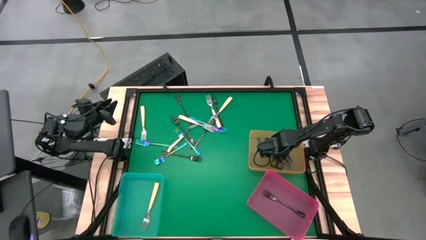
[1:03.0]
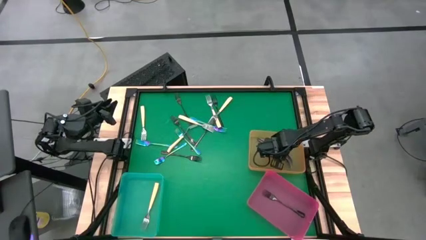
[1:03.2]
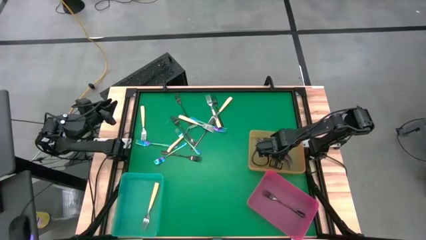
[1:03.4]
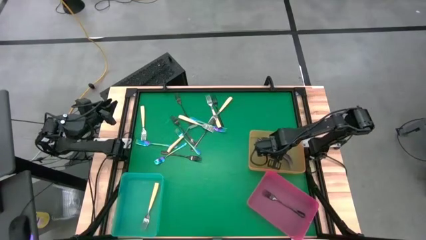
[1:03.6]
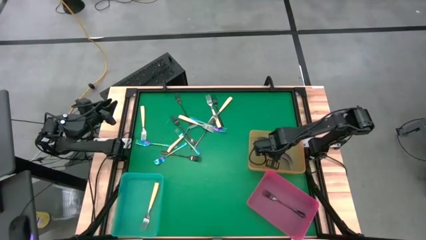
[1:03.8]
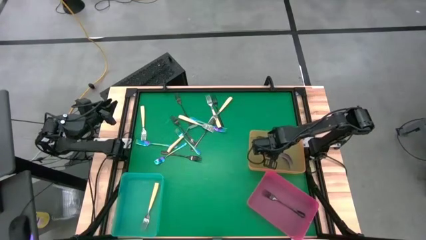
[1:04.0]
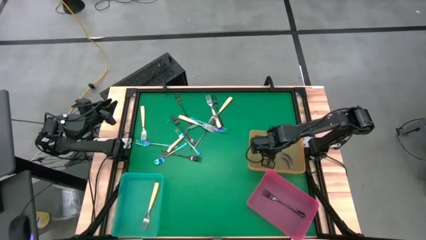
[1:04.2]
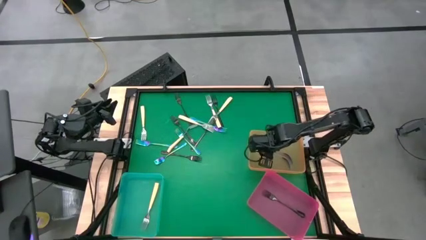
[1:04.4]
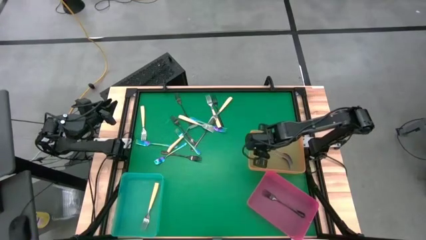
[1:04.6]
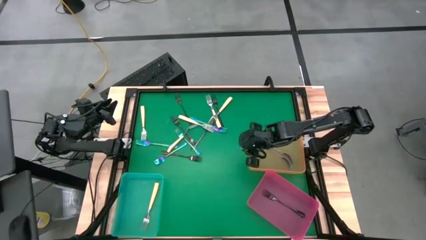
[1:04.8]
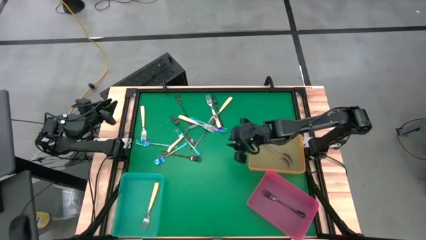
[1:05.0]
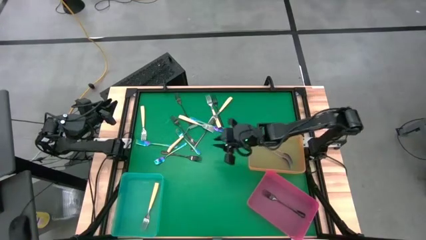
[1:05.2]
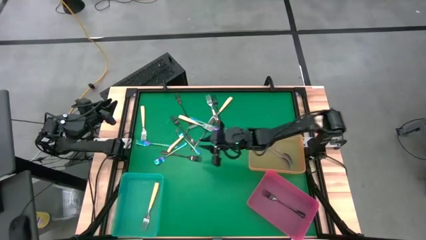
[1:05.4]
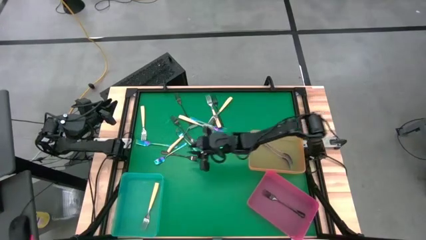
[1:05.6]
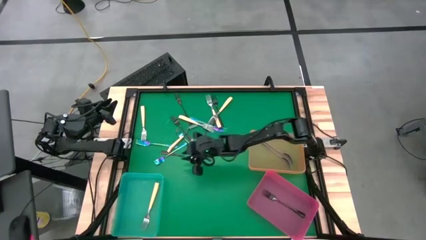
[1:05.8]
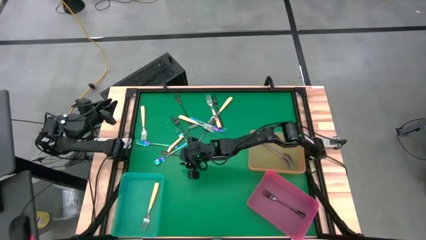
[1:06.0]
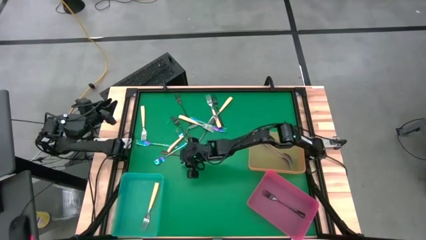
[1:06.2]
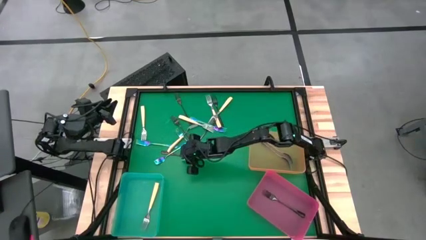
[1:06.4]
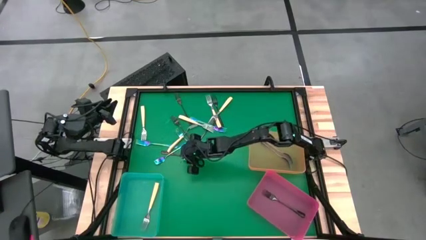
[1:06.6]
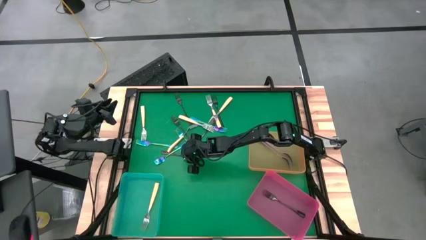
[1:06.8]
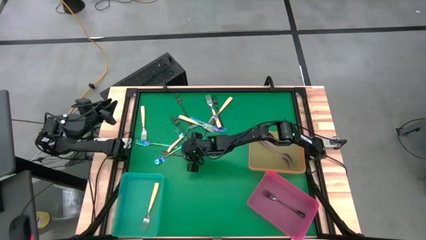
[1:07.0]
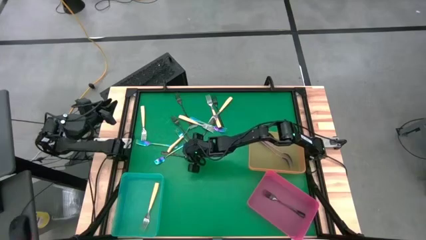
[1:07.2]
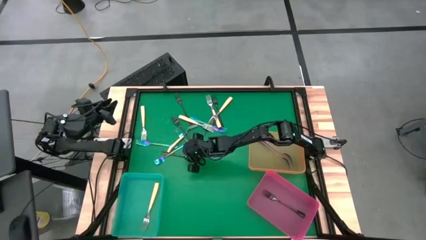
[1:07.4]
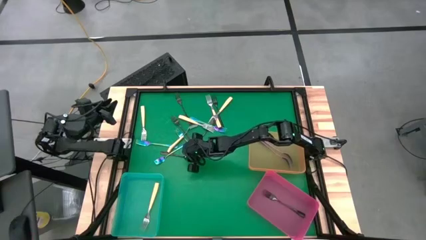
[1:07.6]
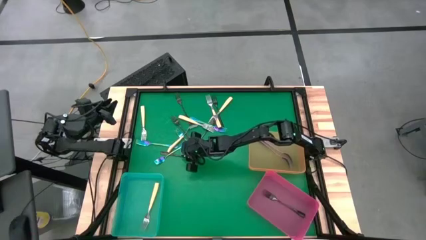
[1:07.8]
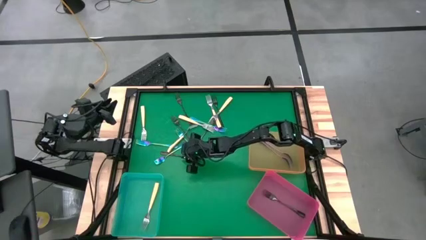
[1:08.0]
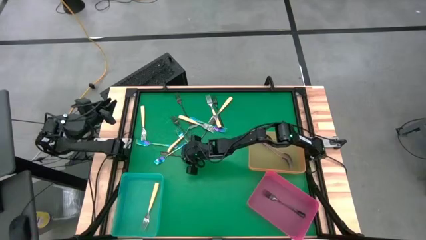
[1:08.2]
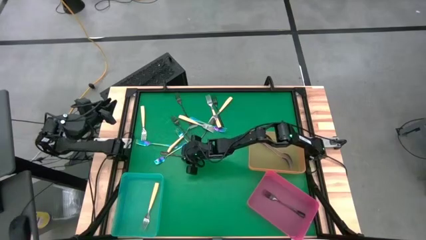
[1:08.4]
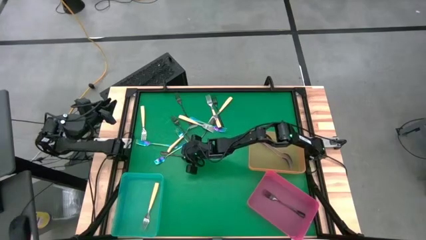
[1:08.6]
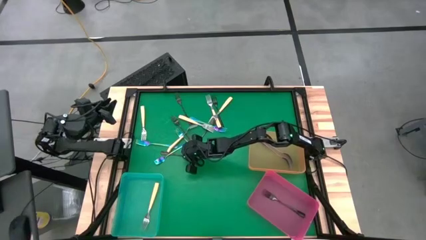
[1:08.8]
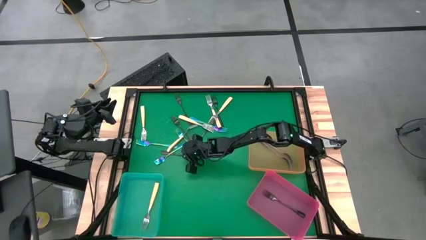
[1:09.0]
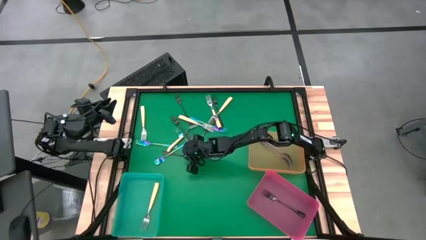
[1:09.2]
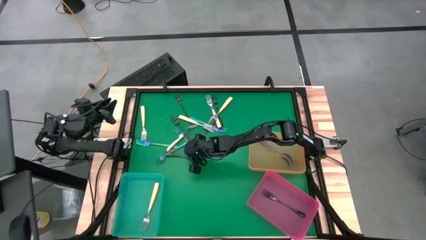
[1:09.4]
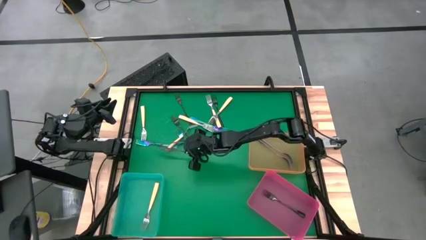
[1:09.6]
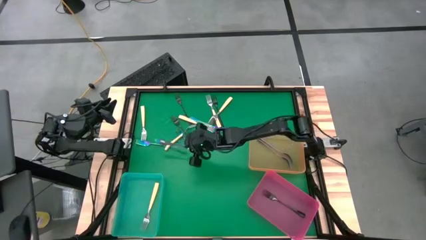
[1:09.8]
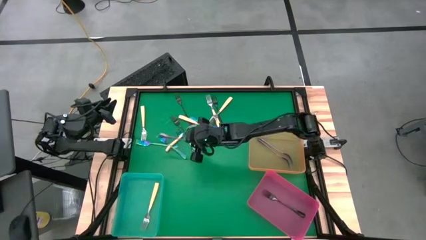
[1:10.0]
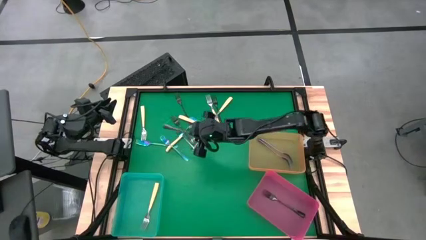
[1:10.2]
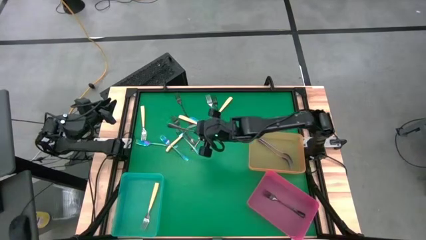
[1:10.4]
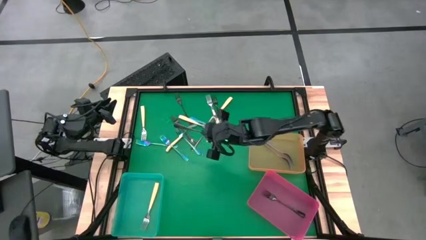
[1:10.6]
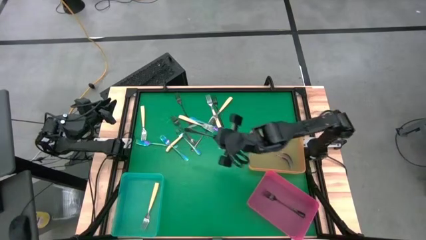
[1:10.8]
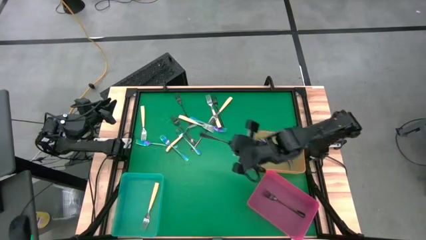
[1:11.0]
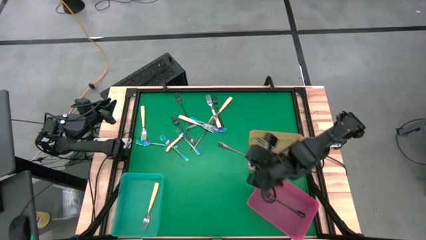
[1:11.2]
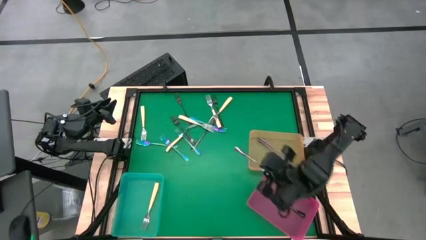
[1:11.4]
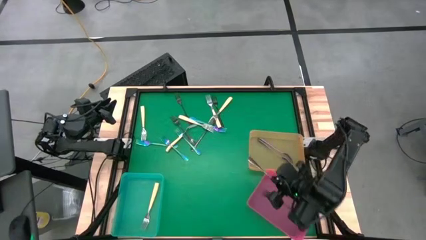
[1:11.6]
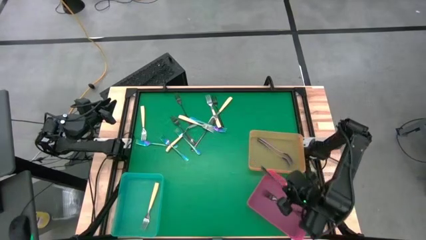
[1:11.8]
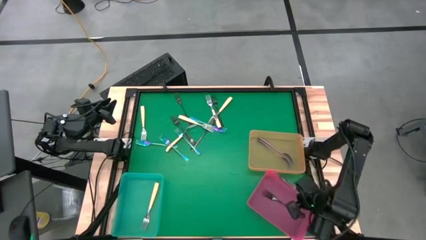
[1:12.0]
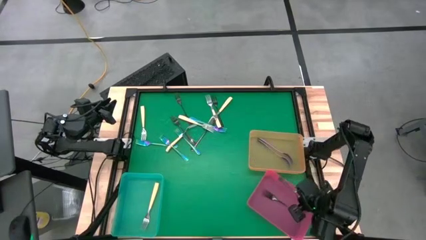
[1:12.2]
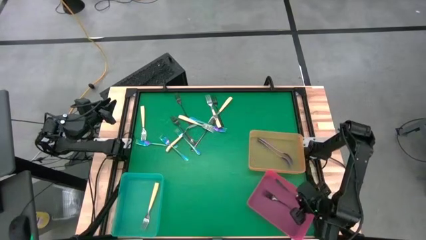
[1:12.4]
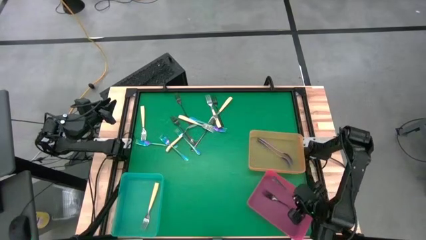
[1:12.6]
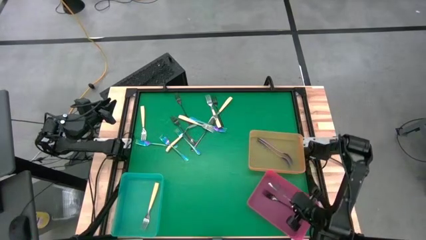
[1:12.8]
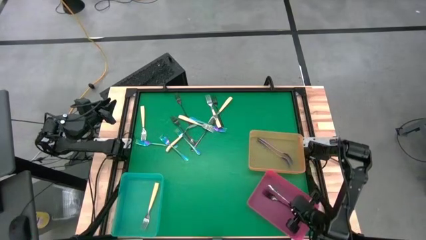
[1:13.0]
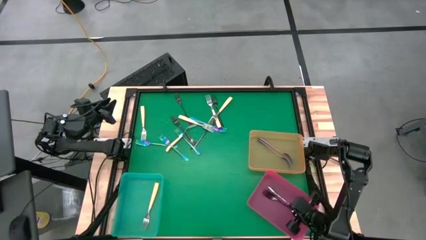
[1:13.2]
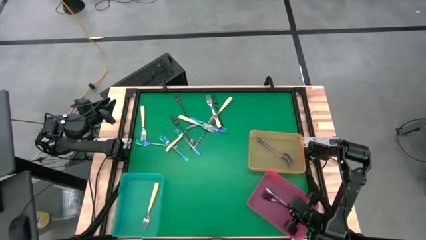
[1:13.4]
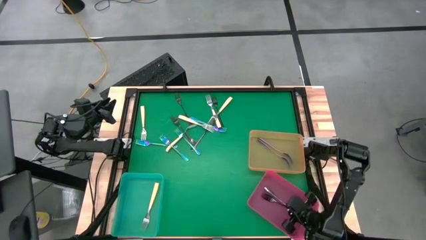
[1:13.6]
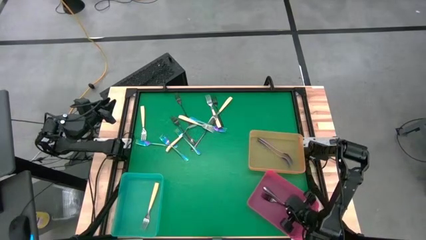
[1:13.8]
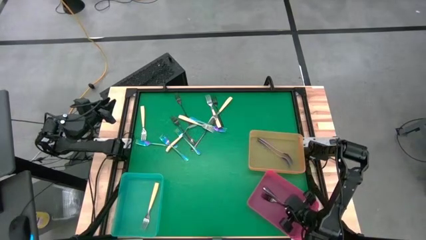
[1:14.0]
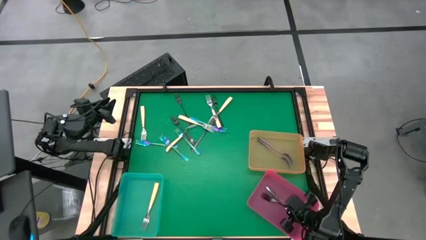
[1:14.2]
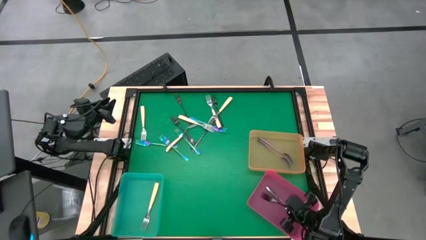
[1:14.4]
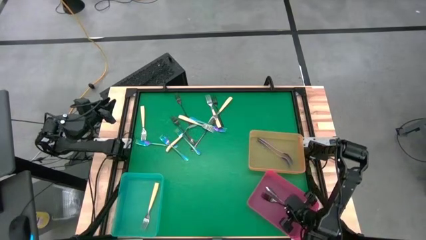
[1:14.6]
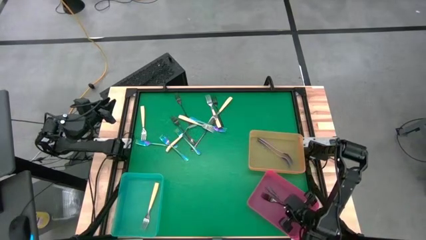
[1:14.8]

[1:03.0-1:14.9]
Task: Sort silverware by color (type)
Put the black fork into the pink bin

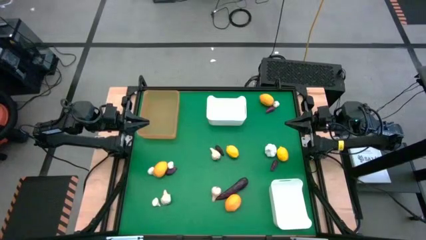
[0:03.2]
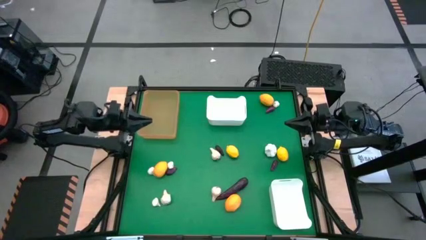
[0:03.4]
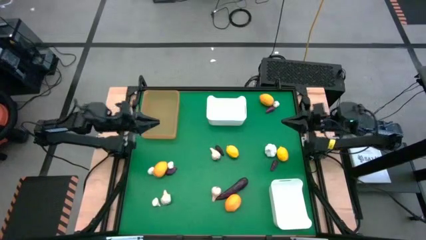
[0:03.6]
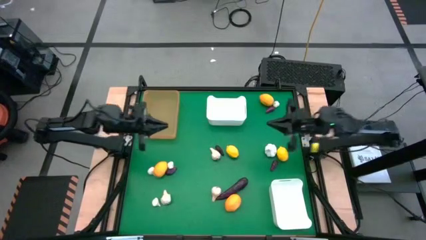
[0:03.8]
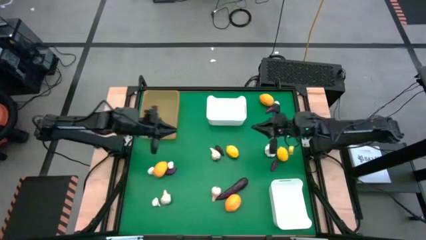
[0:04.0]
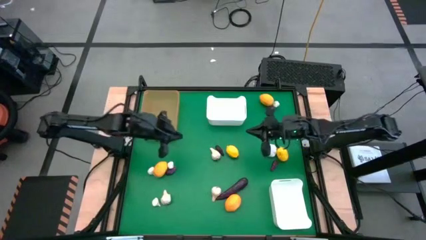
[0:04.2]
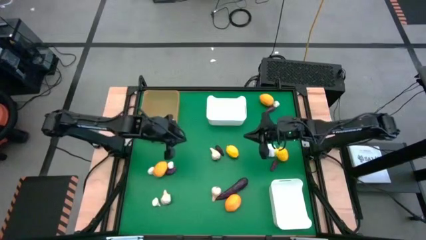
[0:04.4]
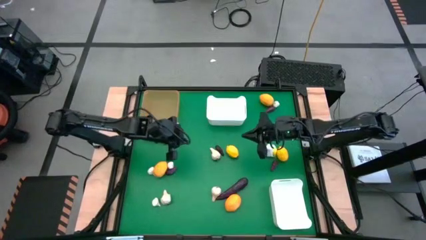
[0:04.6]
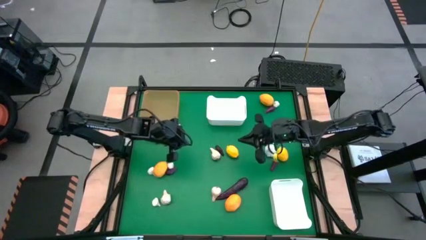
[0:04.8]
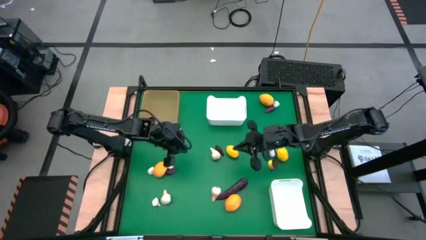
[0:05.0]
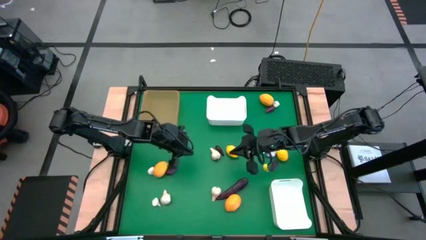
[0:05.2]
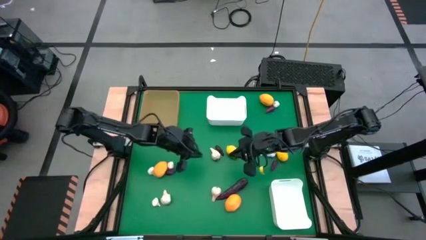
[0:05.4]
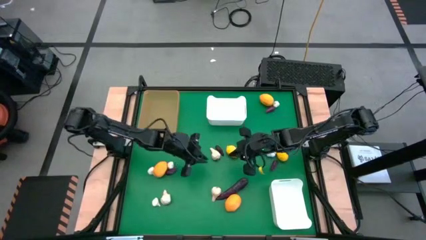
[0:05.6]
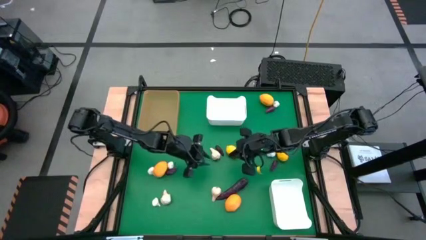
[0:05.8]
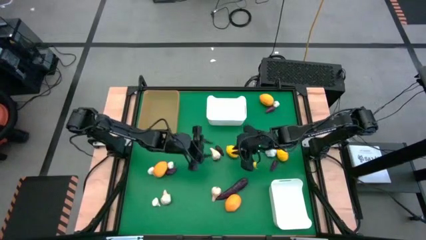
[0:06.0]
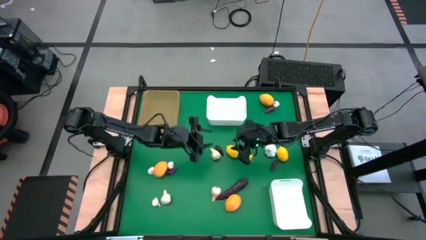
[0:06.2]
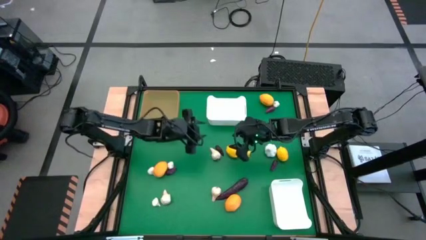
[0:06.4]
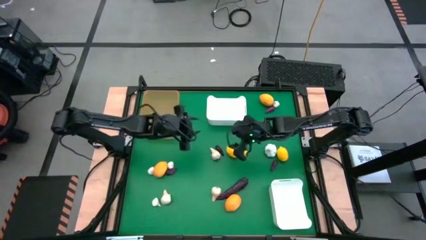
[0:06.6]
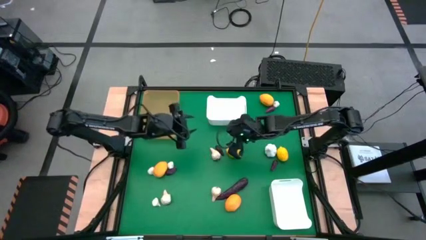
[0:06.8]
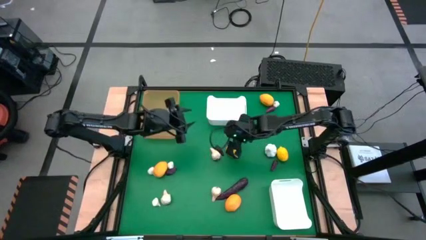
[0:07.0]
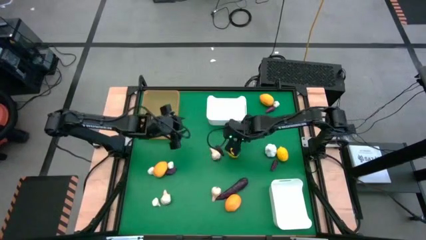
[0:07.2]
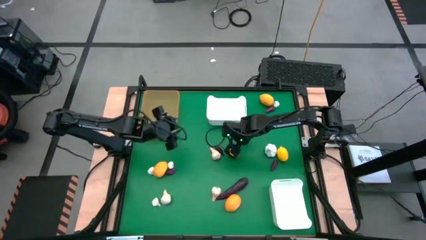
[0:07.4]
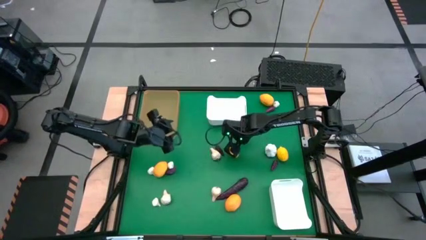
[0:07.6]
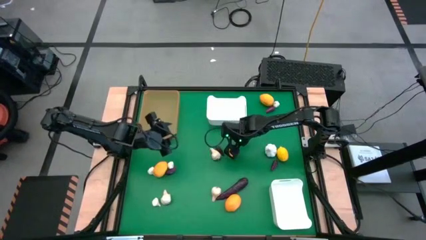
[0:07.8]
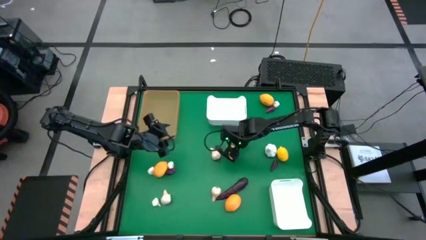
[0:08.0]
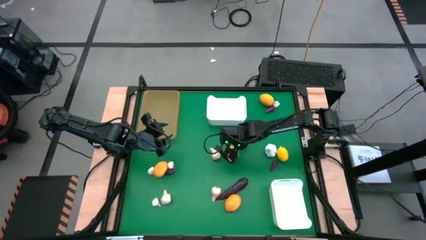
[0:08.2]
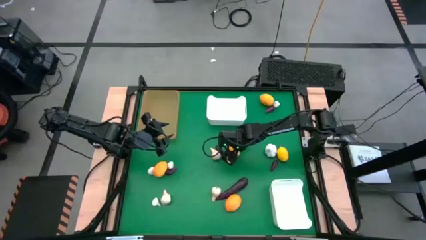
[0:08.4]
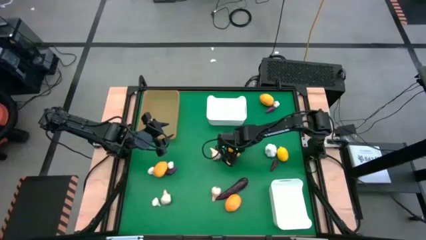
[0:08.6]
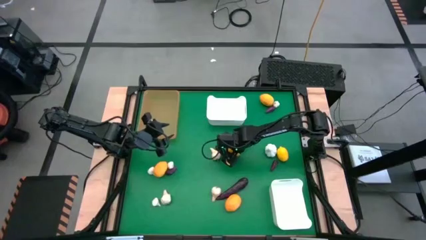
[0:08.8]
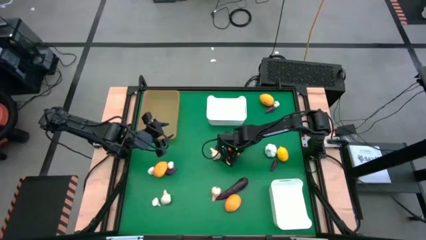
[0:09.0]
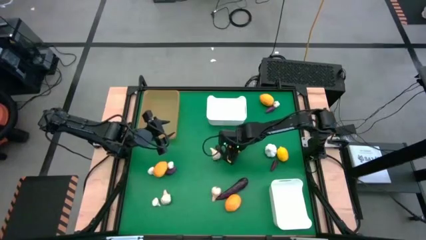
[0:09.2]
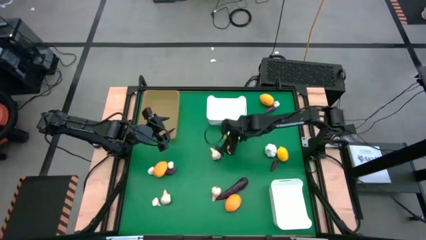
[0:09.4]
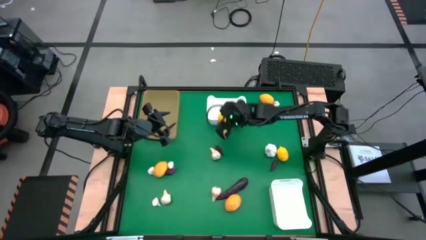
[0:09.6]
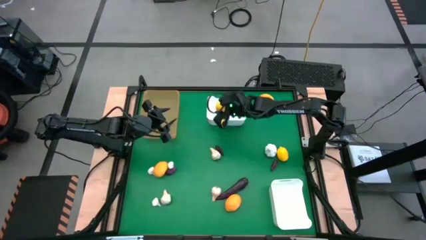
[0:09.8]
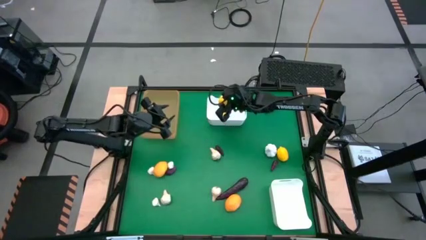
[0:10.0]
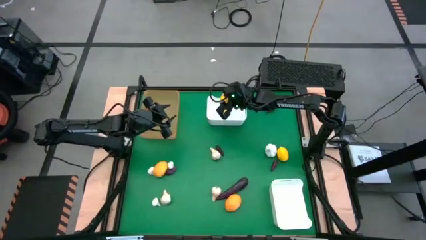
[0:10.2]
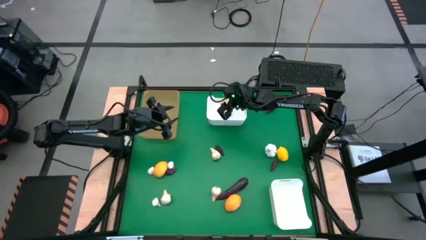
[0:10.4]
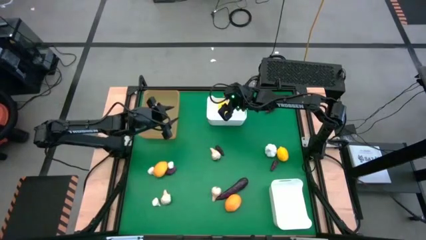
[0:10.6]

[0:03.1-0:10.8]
Task: Sort produce into baskets
Put the lemon into the top white bin
